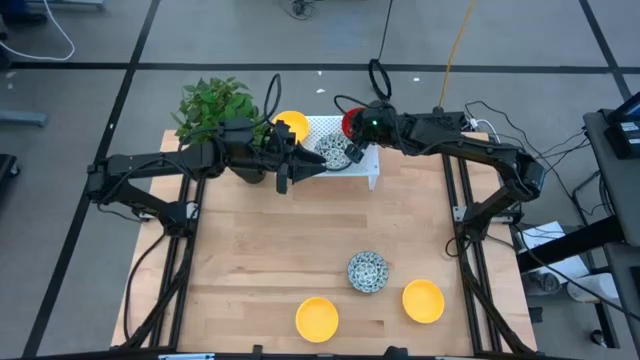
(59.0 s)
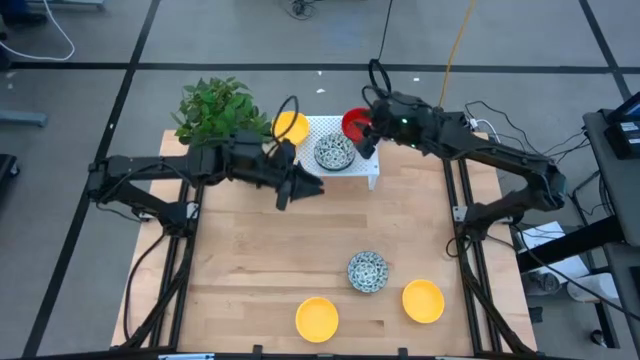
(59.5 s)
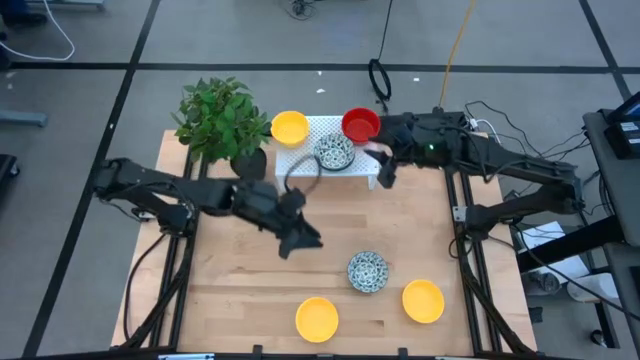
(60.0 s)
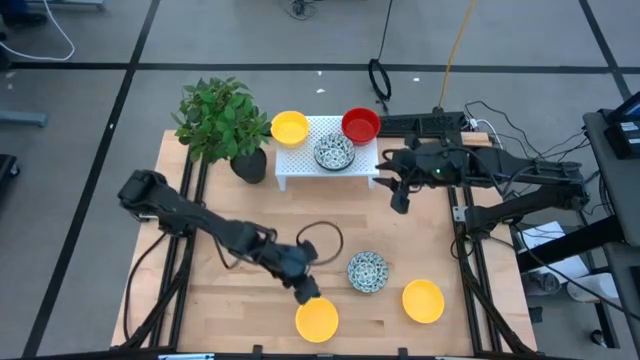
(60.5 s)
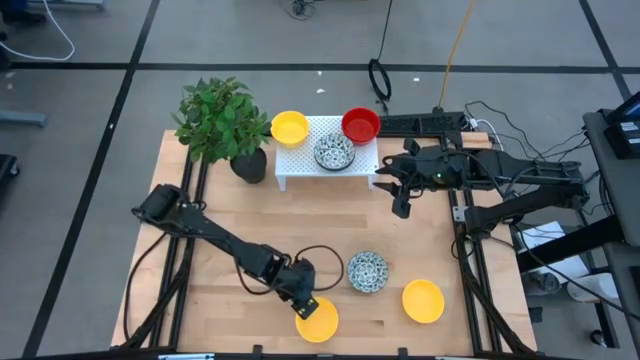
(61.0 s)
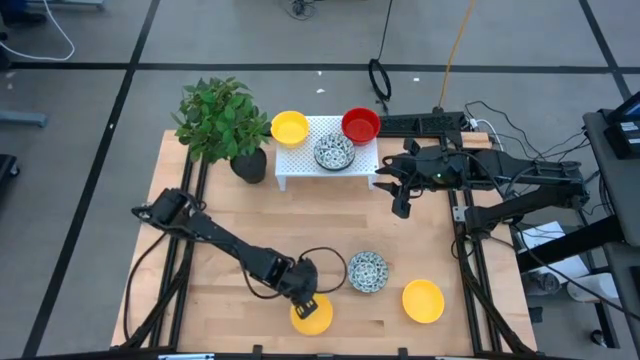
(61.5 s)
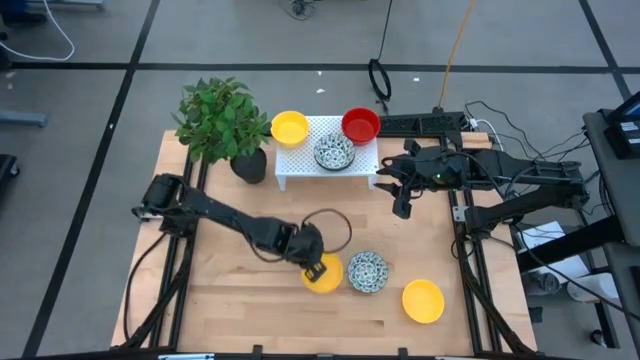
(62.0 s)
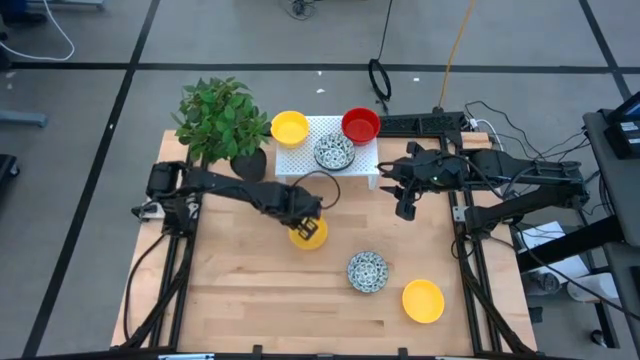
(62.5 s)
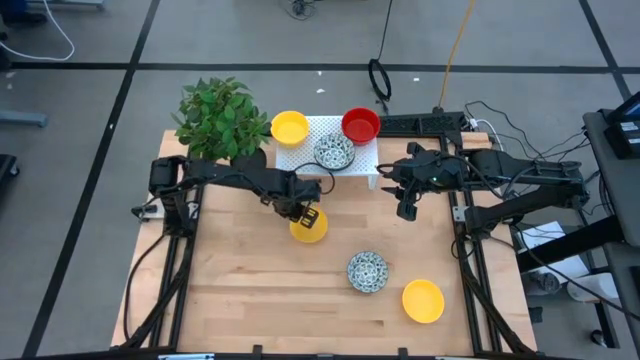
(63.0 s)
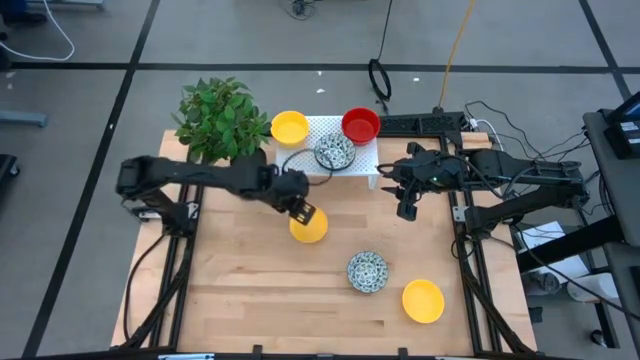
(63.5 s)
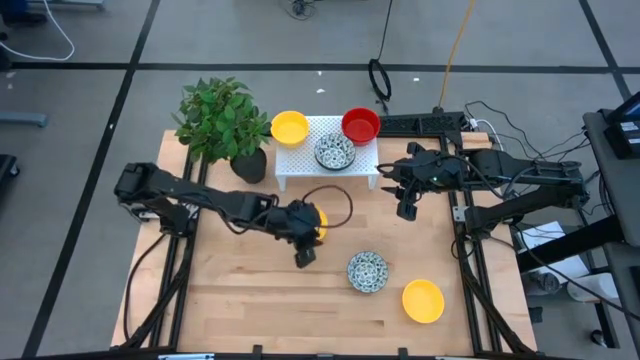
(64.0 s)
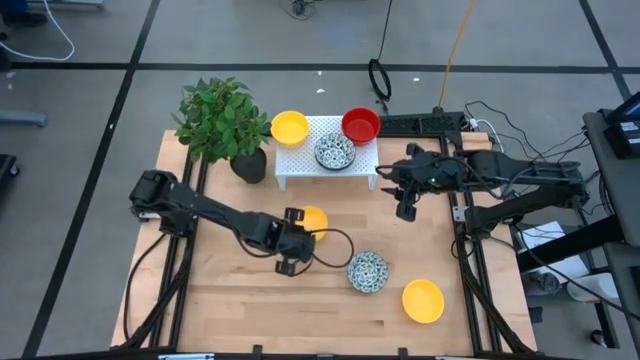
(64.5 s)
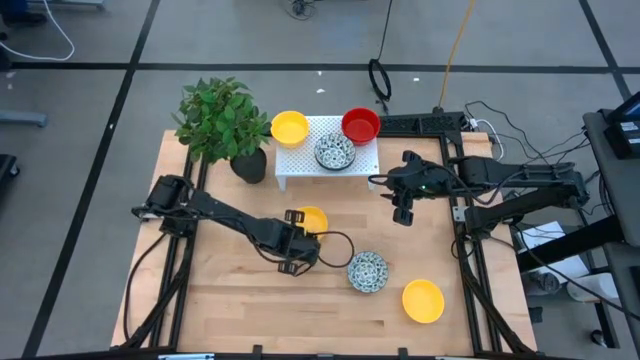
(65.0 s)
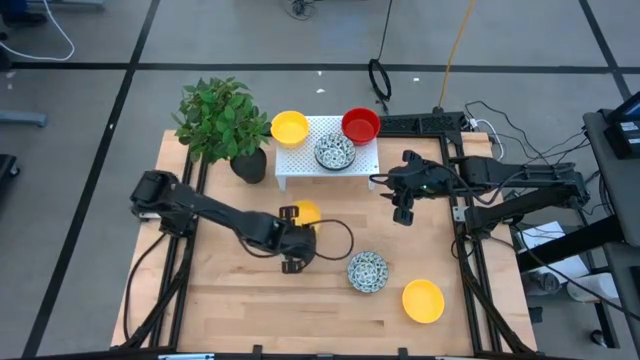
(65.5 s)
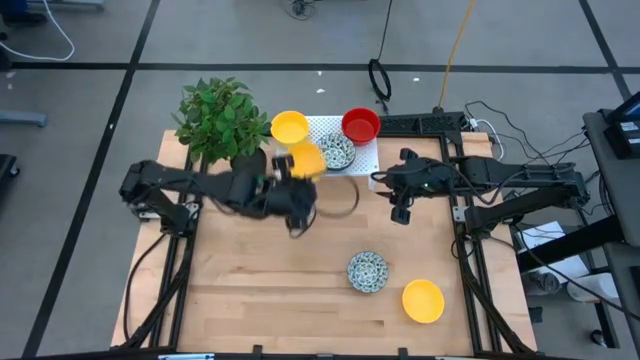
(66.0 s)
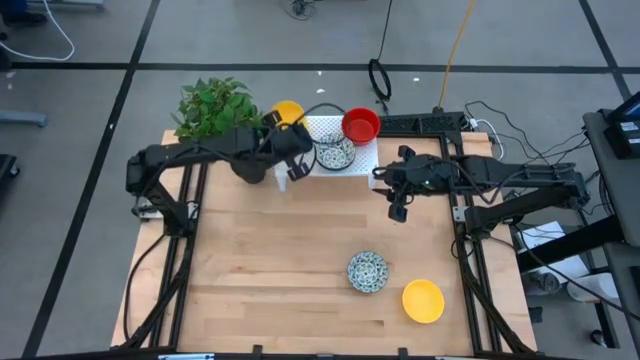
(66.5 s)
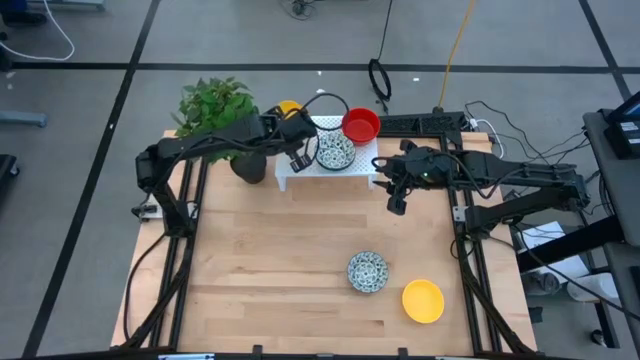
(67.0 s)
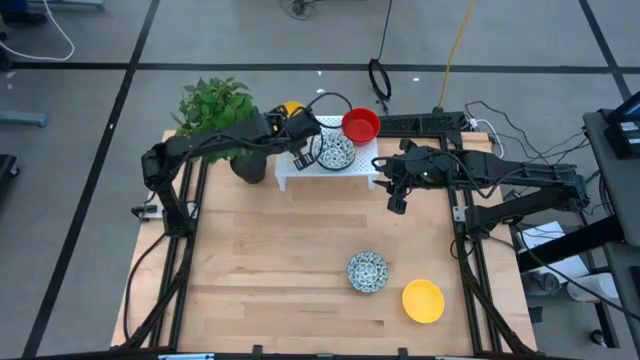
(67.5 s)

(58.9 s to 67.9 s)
Task: Pick & Place Mini bowls
Stack the yellow bowl on the yellow bowl on the shelf

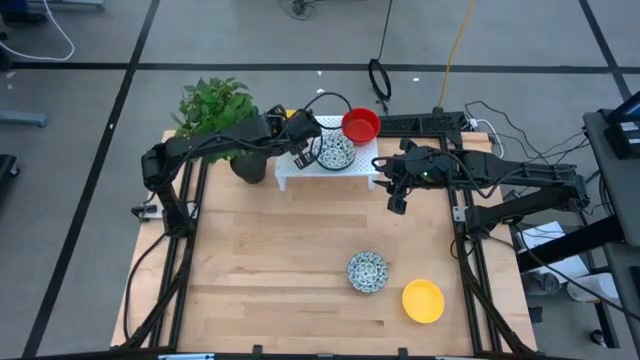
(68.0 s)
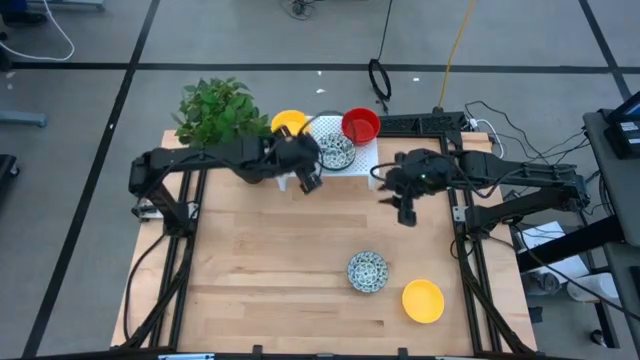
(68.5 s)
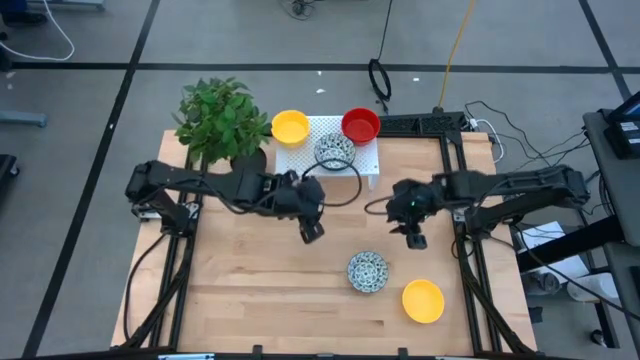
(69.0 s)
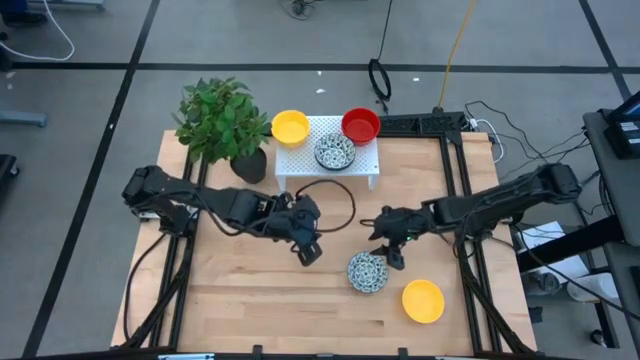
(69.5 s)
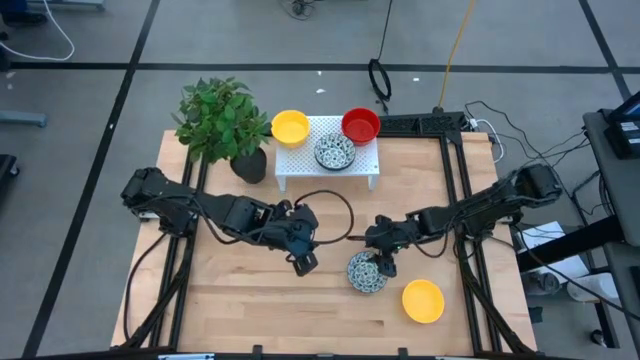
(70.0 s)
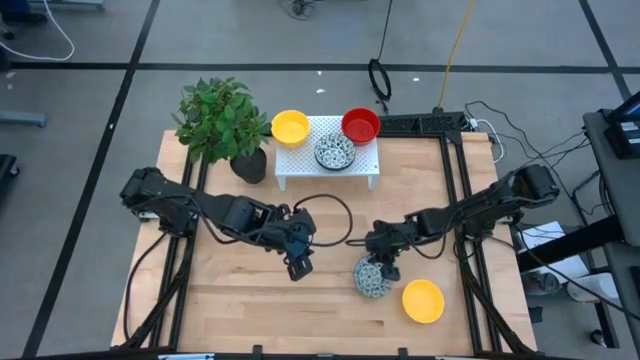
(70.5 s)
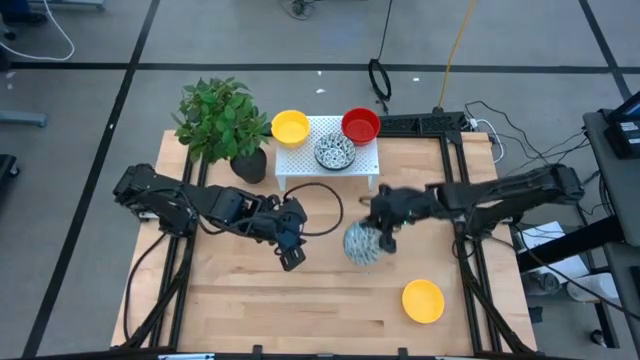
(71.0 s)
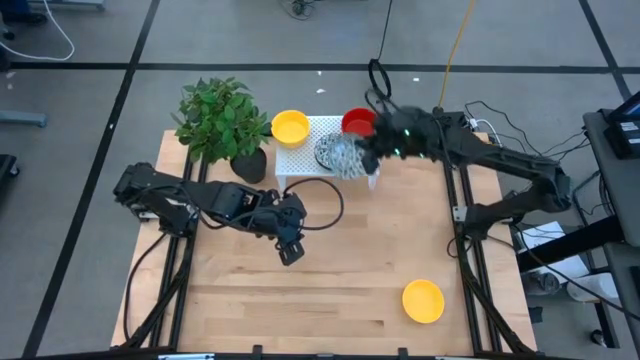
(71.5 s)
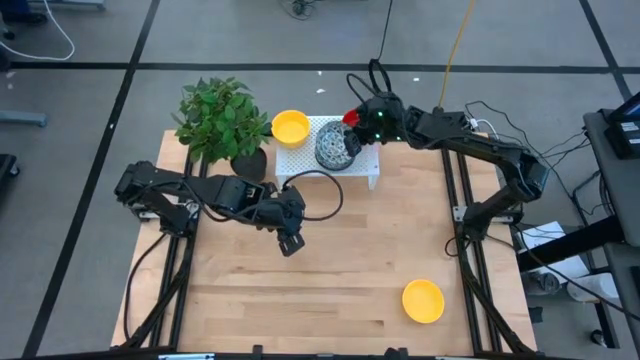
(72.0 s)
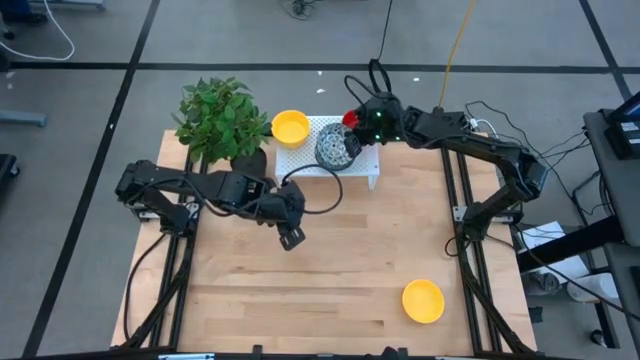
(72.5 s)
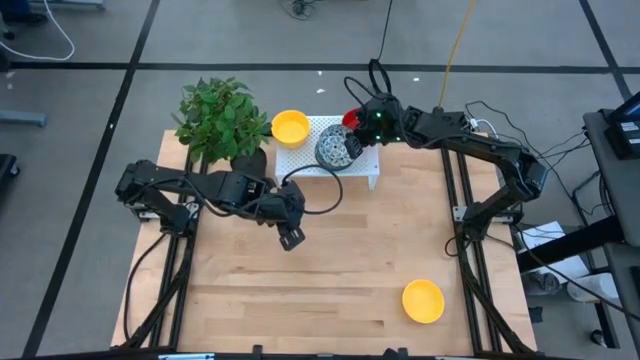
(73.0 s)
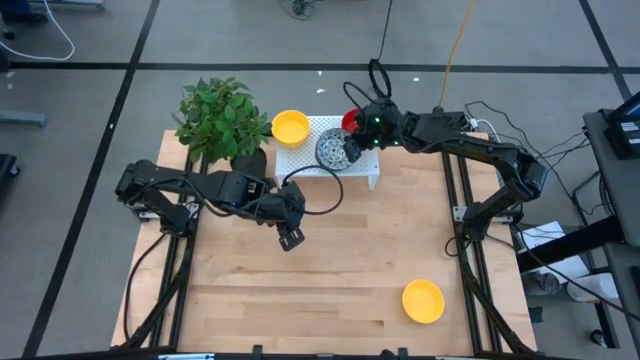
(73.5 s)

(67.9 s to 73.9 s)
Stack the blue patterned bowl on the blue patterned bowl on the shelf

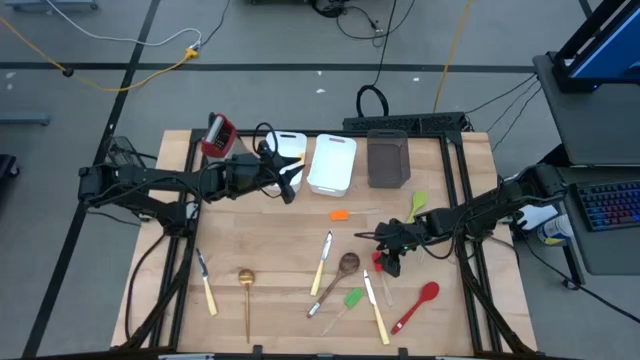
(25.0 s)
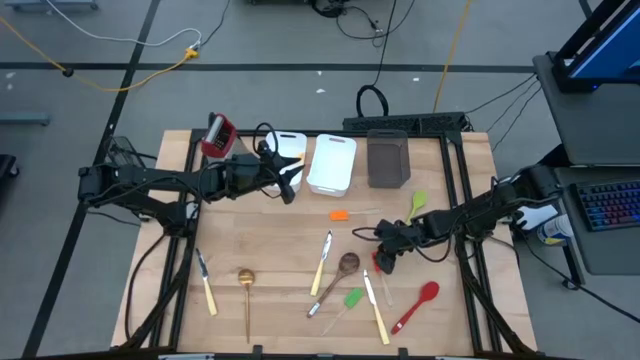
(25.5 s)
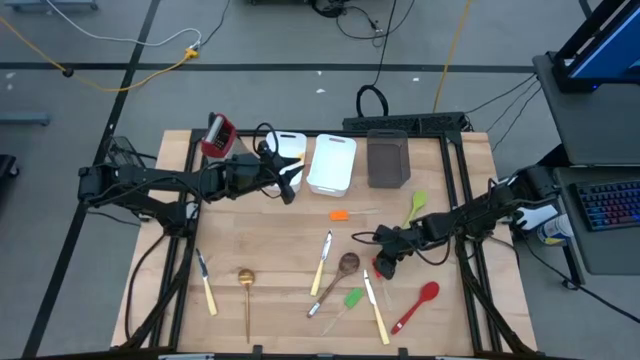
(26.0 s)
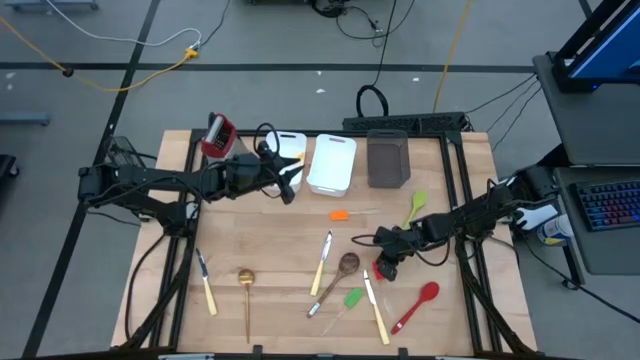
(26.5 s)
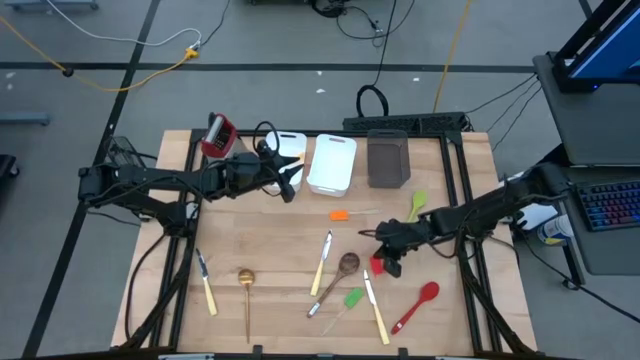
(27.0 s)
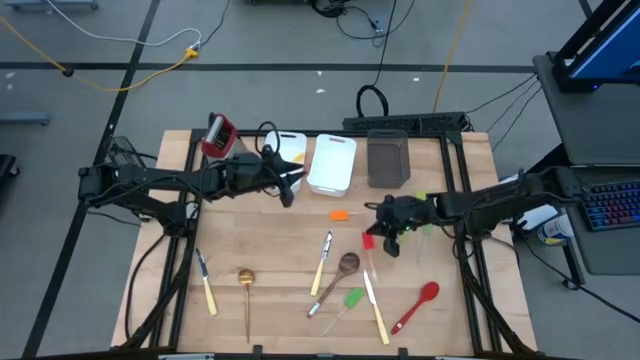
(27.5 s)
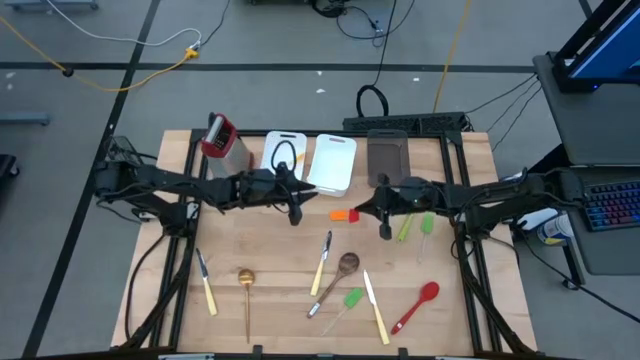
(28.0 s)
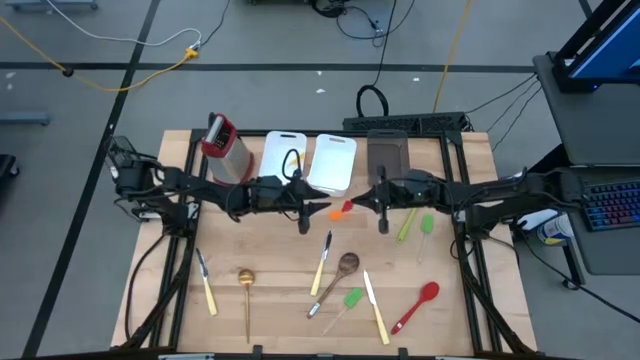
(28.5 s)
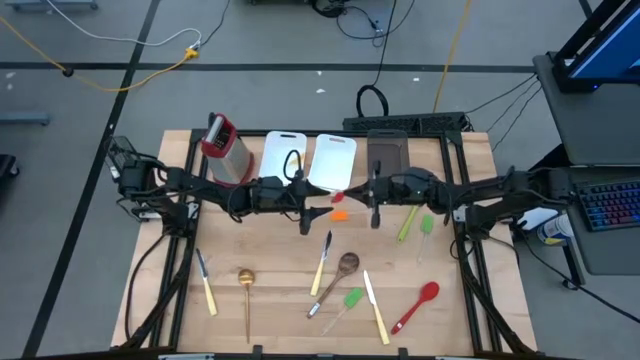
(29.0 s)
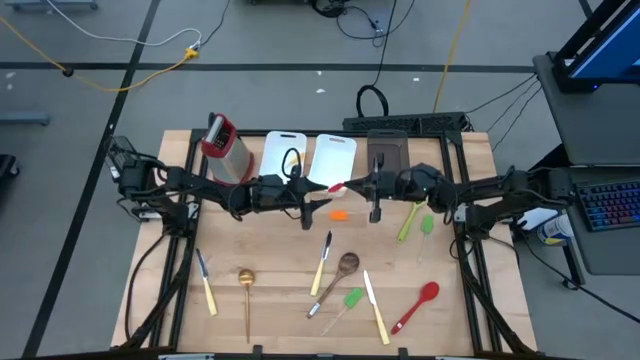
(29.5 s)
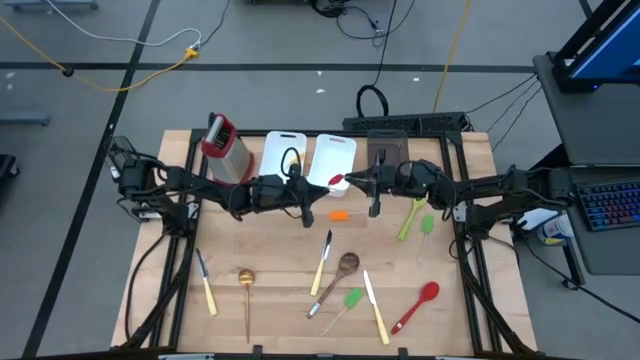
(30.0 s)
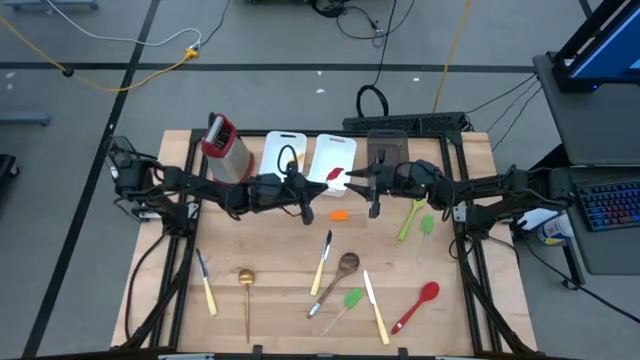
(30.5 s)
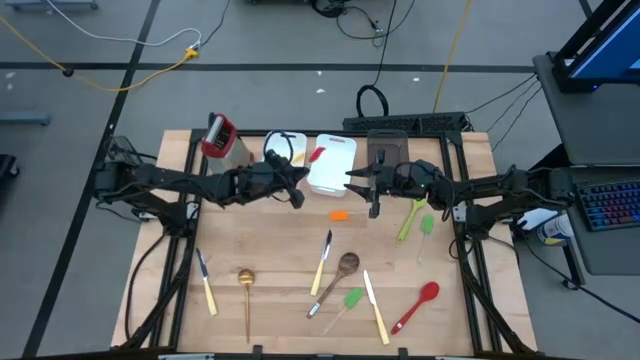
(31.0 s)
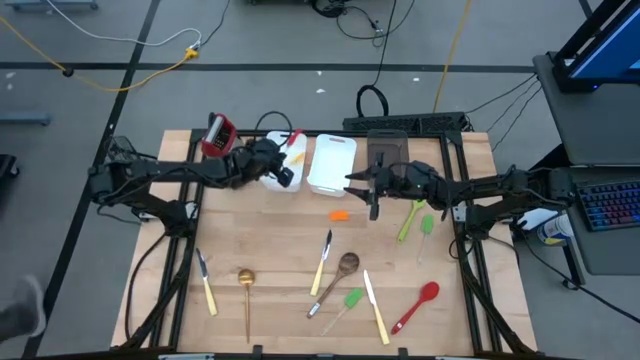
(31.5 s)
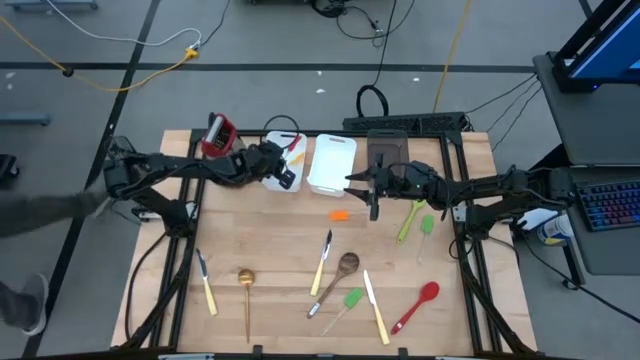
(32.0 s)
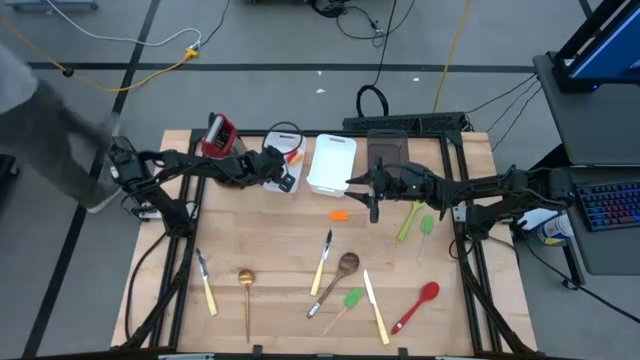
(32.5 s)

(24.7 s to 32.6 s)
Task: Pick & Place Kitchen Items
Put the red spatula into the left white bin
